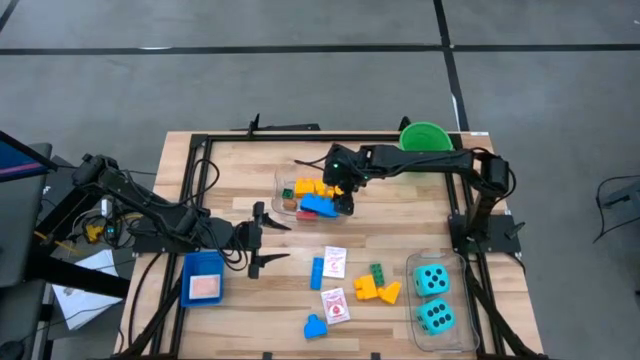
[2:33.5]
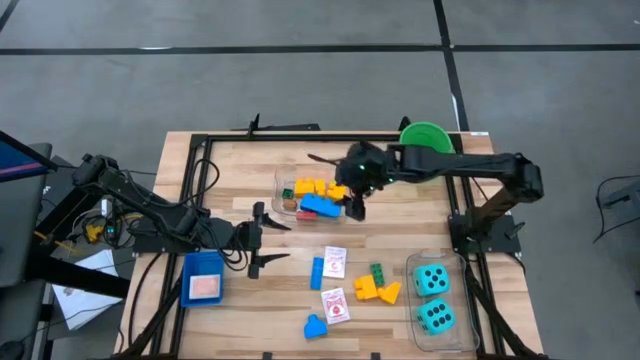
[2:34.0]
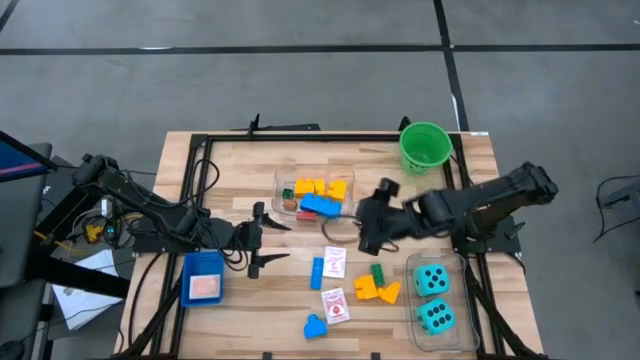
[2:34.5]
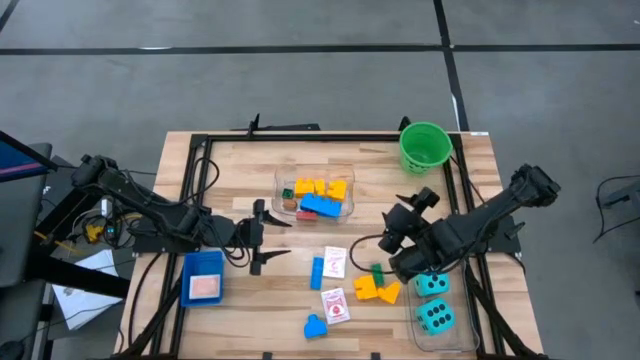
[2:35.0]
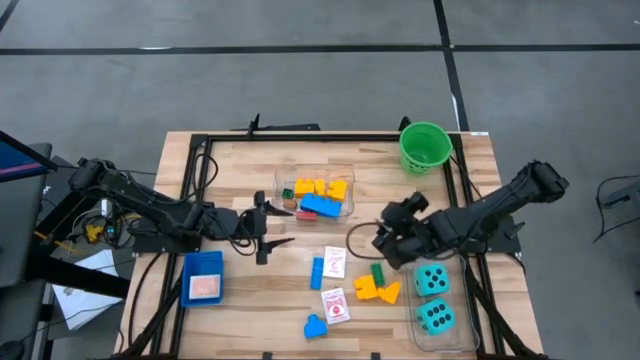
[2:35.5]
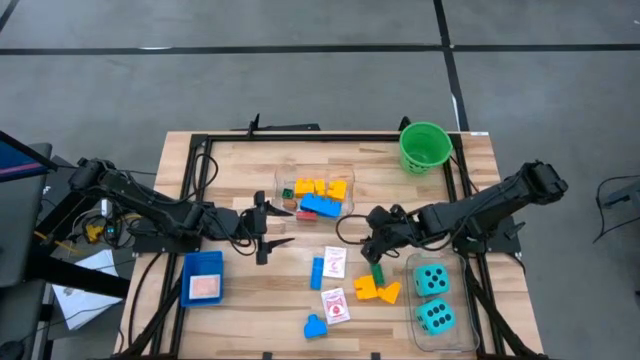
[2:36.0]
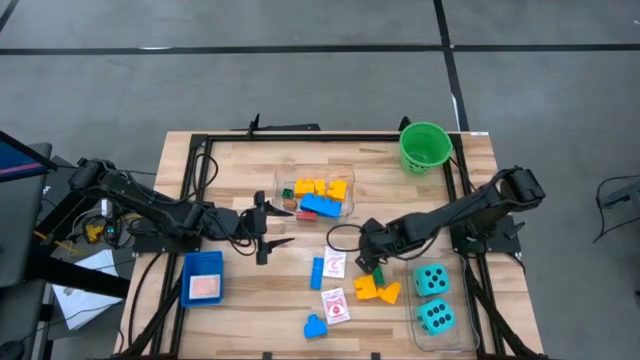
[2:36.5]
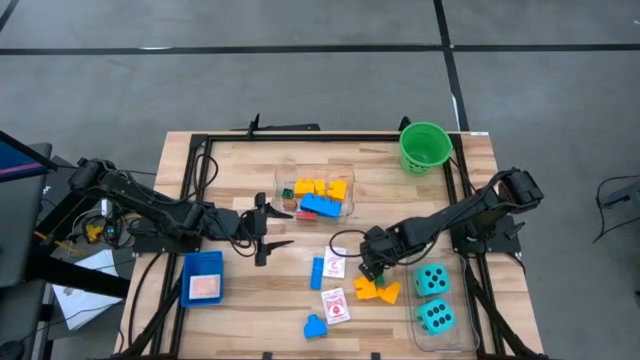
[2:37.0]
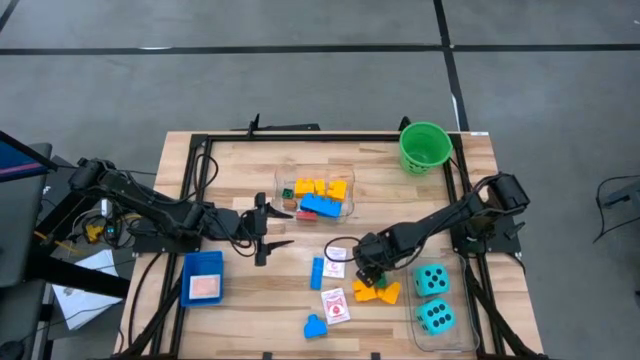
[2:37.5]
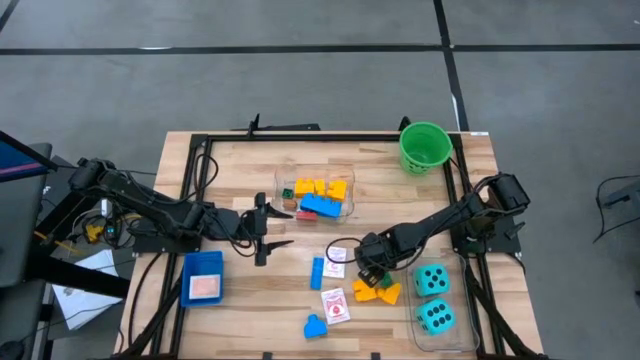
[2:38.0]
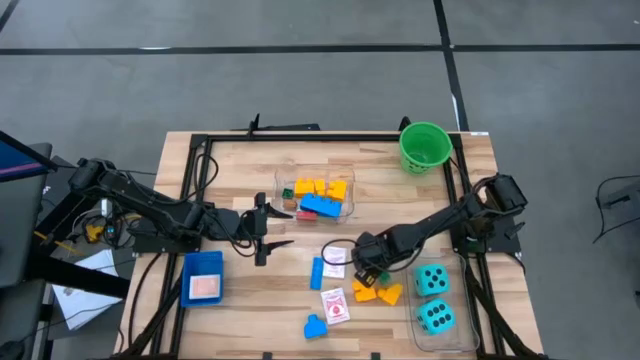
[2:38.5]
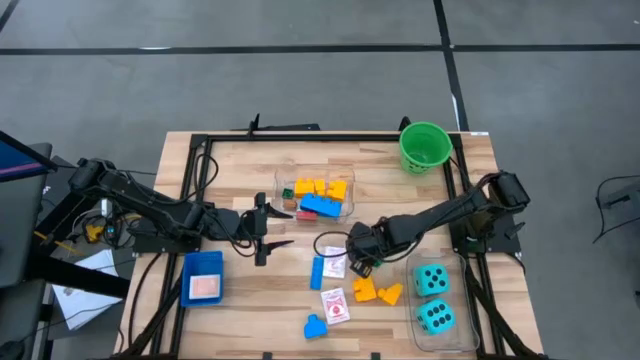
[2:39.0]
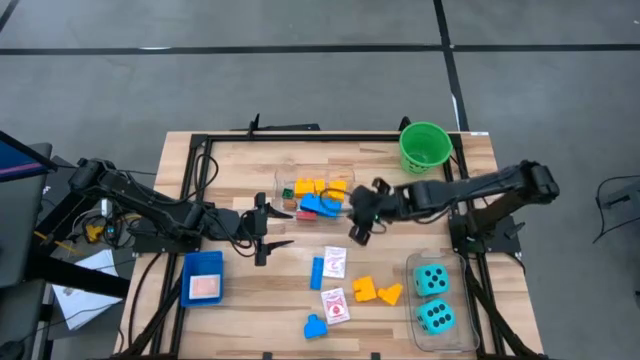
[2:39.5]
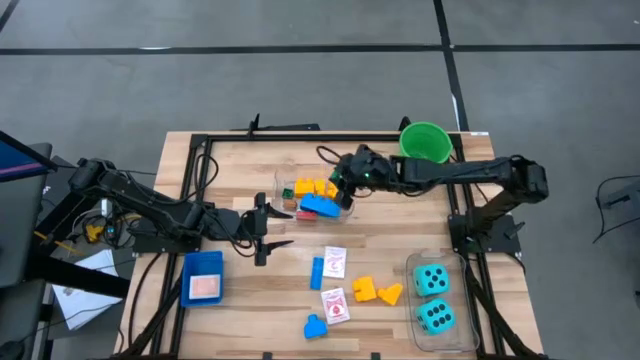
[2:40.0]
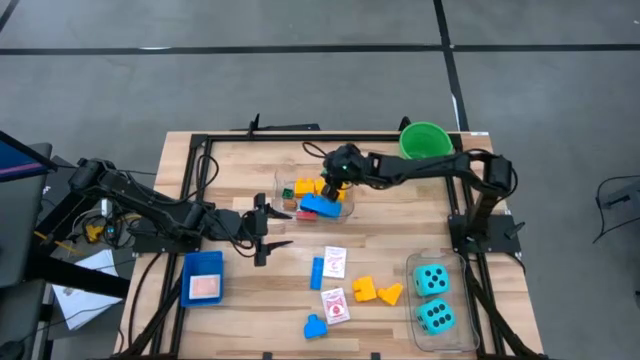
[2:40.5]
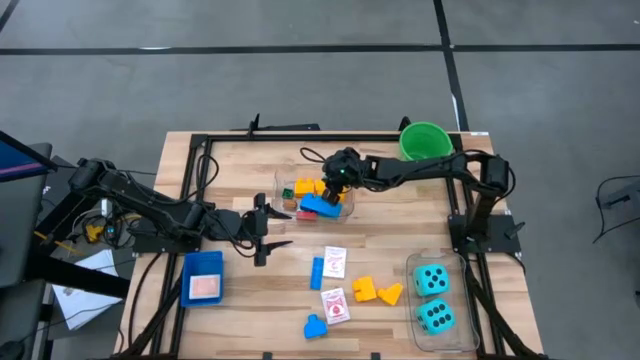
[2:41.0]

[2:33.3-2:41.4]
Task: Pick & Place Toys
Put the green game piece into the top transparent bin

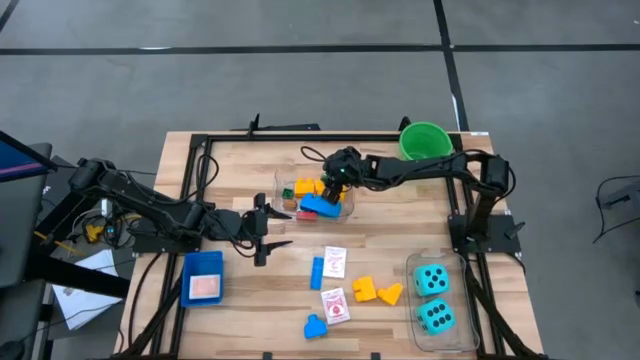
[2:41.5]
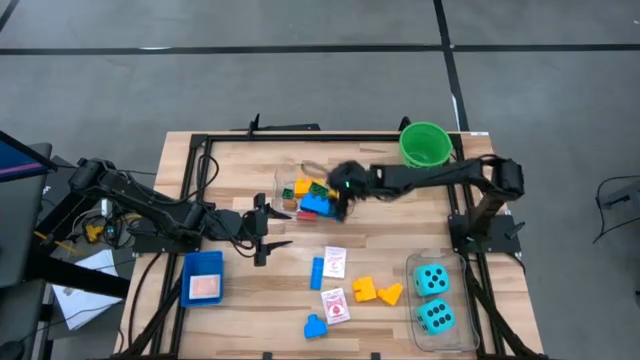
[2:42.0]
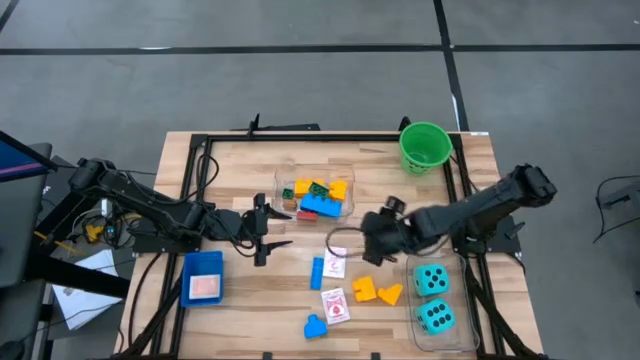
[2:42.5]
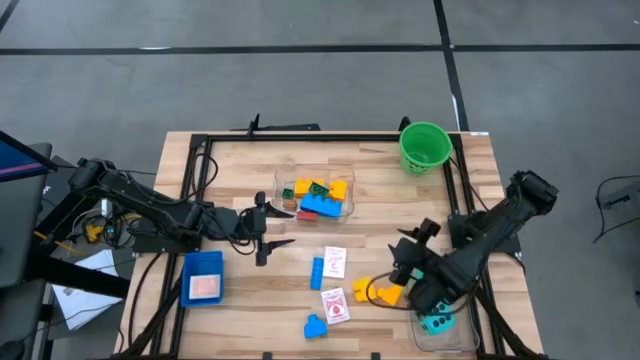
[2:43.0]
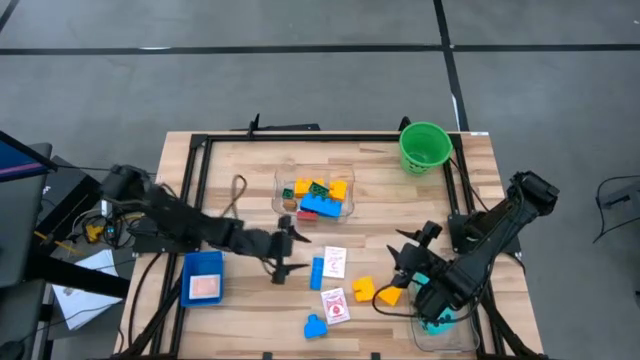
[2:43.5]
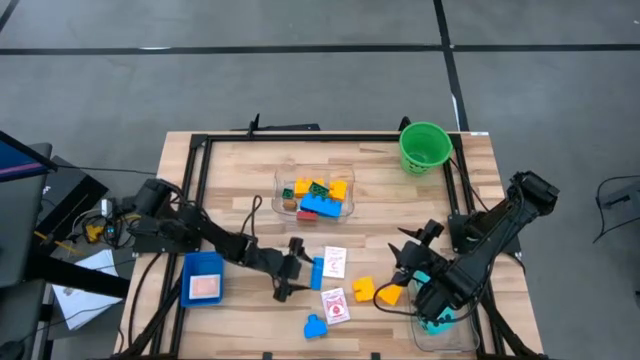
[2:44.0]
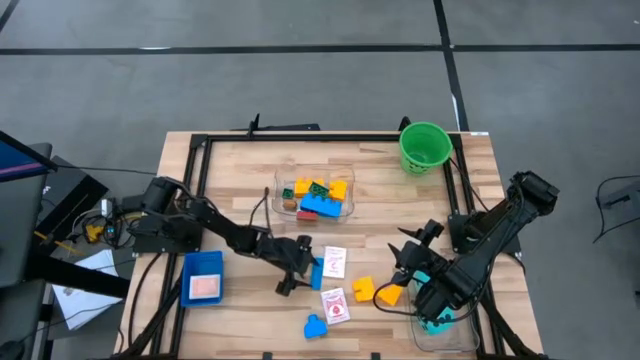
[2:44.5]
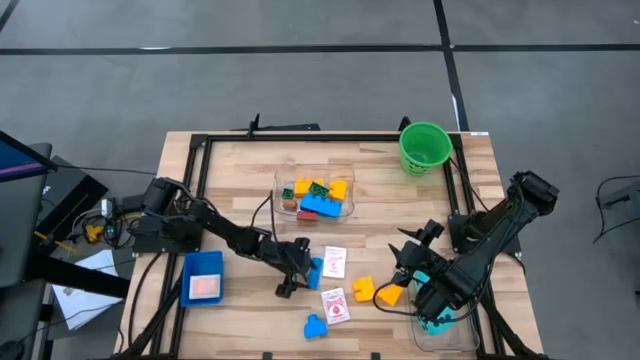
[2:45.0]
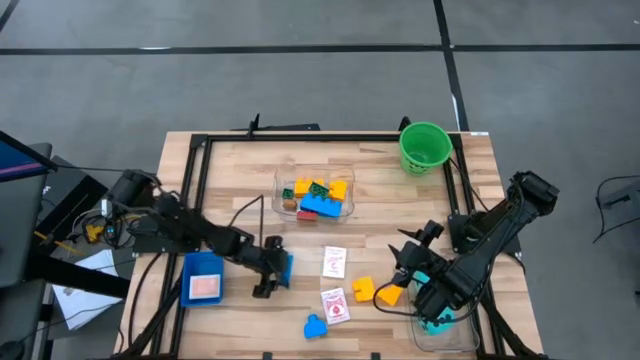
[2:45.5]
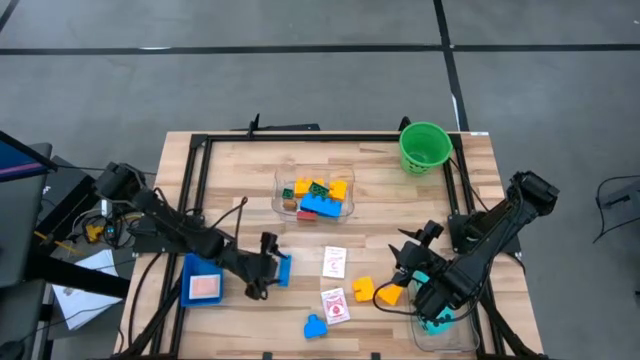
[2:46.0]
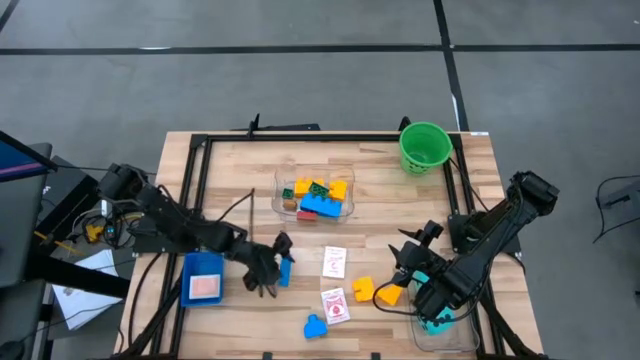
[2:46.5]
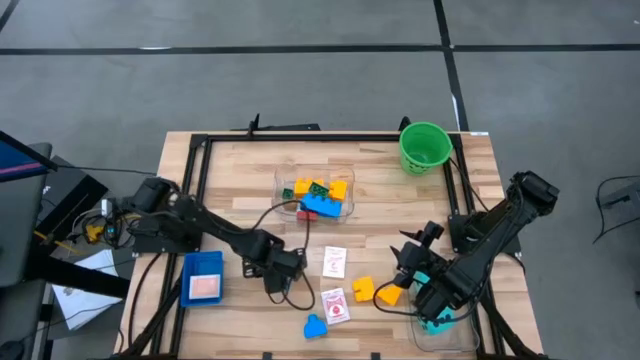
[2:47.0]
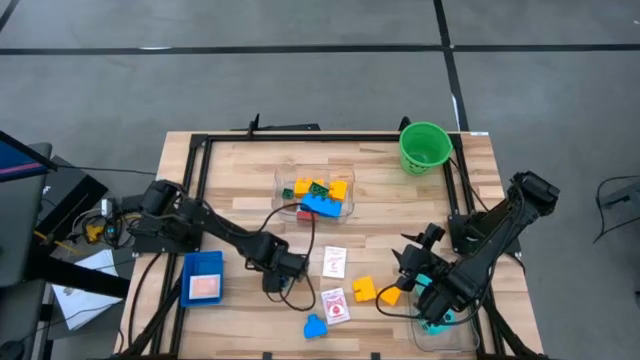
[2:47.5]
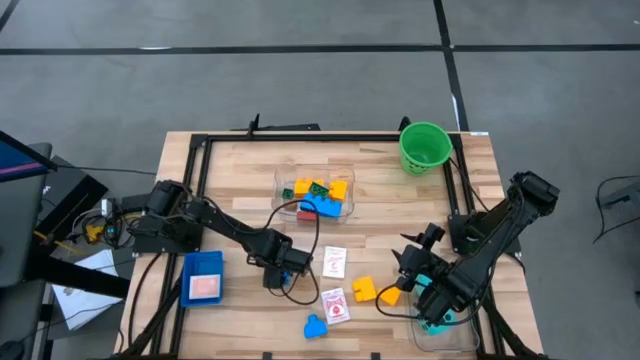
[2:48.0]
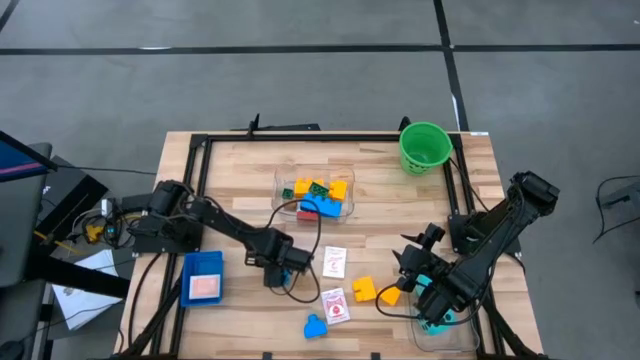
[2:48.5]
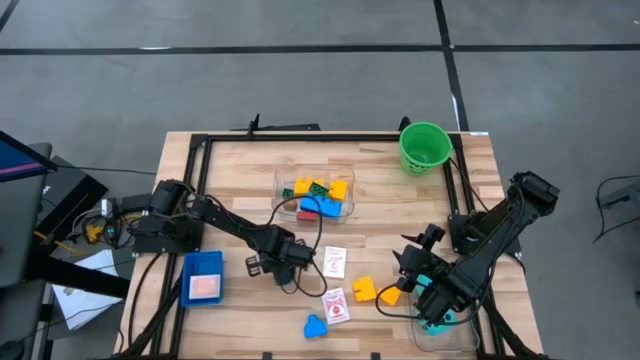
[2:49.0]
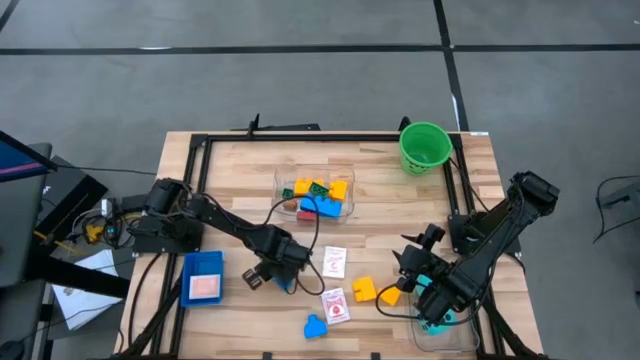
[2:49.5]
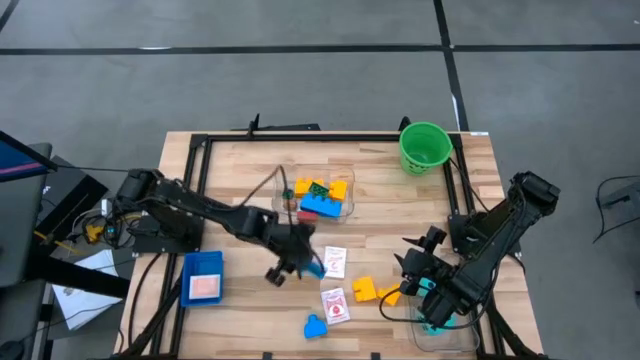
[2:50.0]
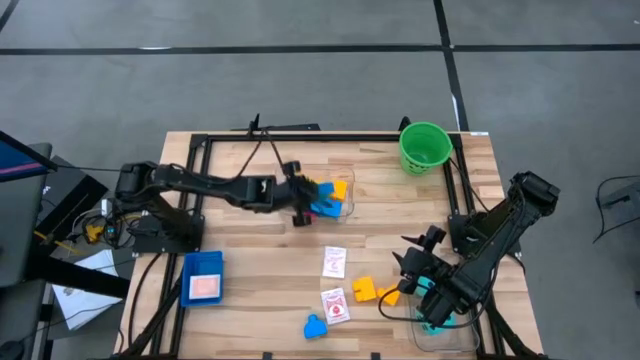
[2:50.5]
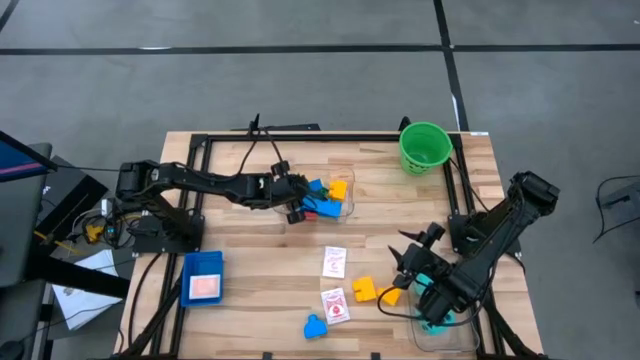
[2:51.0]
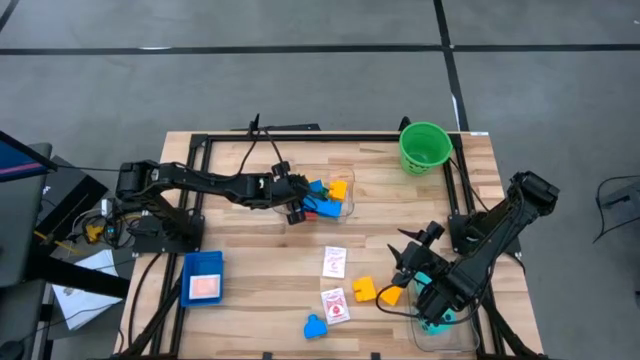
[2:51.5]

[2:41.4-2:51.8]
Put the blue game piece into the top transparent bin

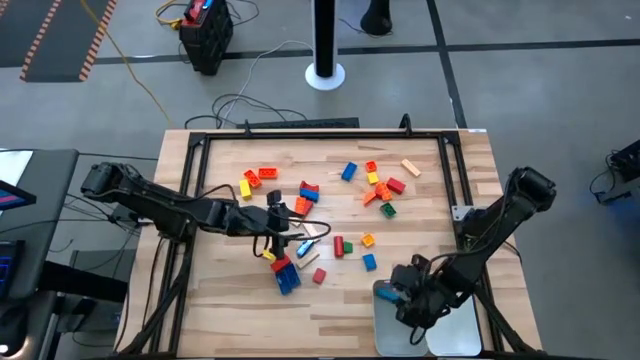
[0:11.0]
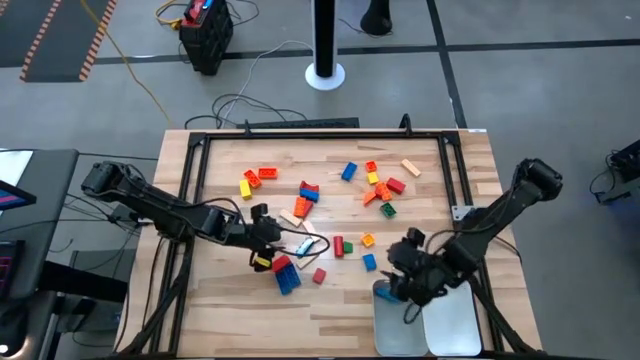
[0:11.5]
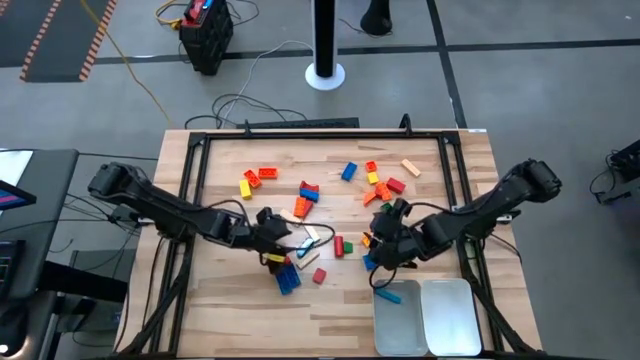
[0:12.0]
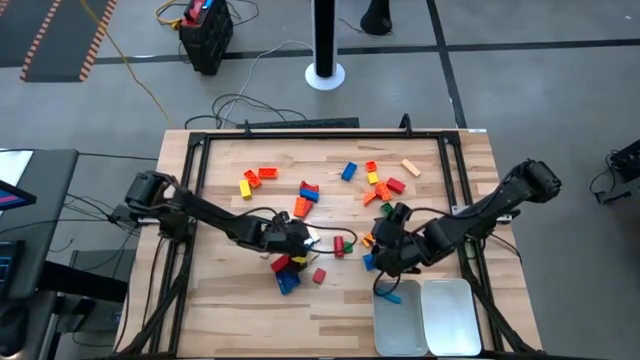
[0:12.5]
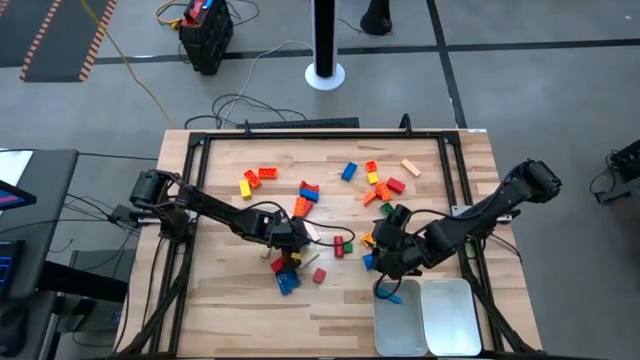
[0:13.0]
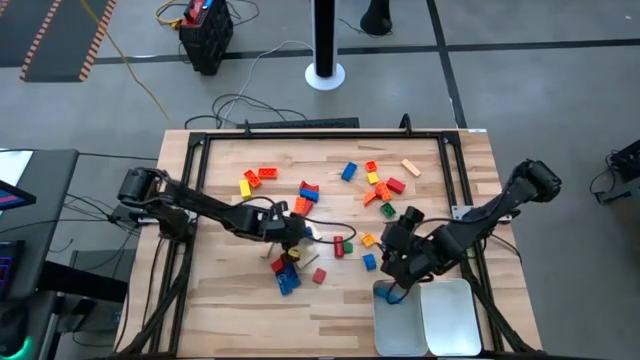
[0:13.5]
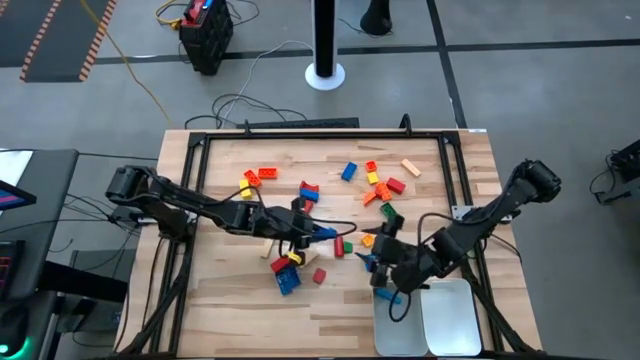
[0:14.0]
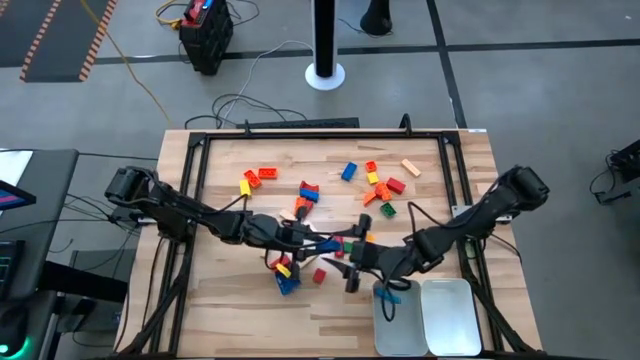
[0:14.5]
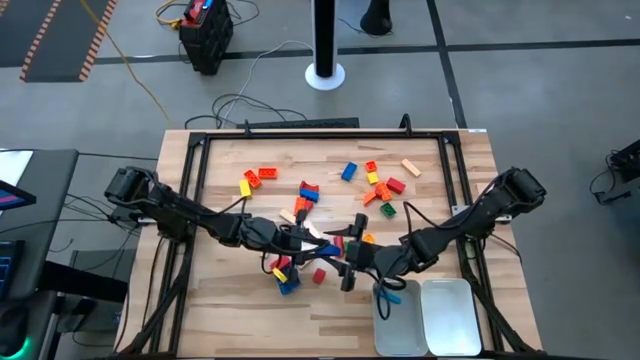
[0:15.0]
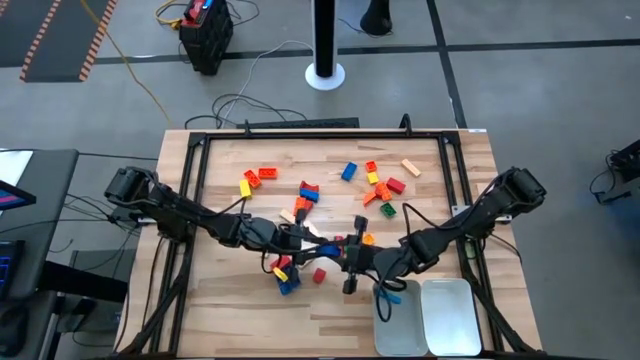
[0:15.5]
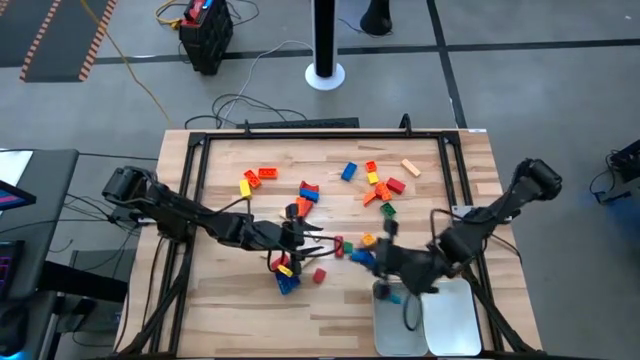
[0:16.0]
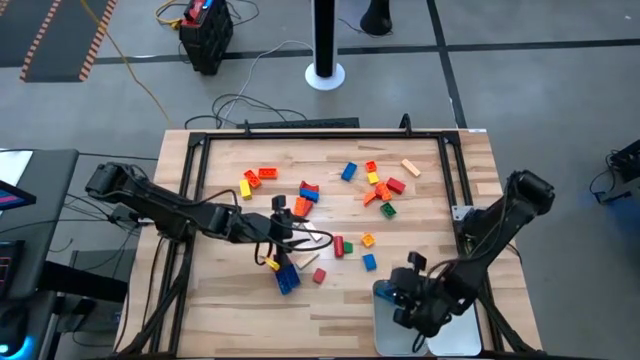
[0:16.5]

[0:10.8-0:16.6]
Task: Sort blocks by size
Put the large blue game piece into the gray bin
